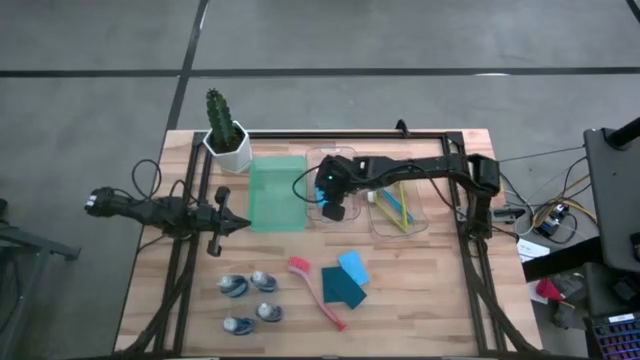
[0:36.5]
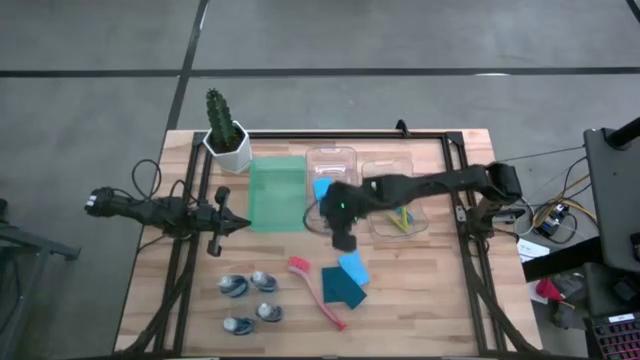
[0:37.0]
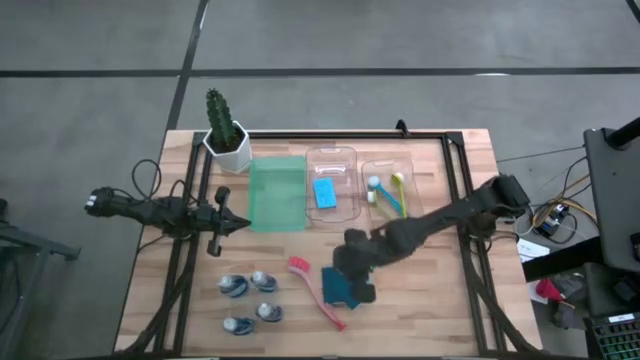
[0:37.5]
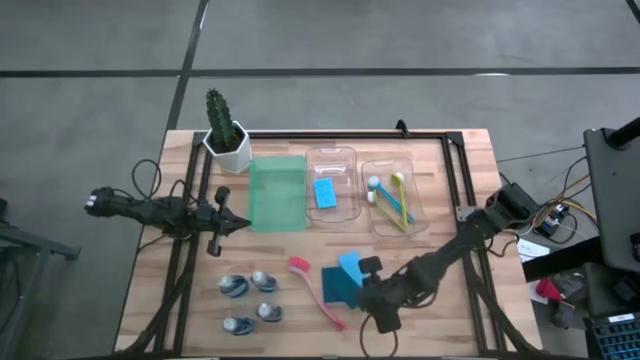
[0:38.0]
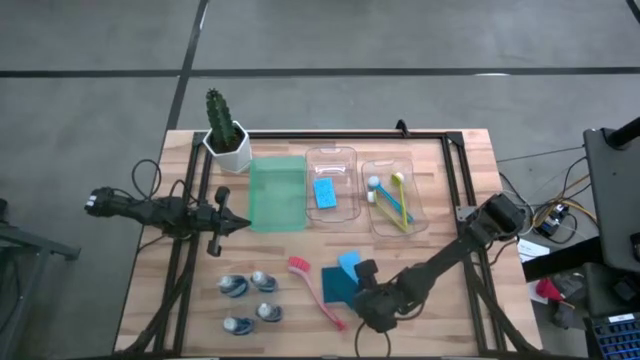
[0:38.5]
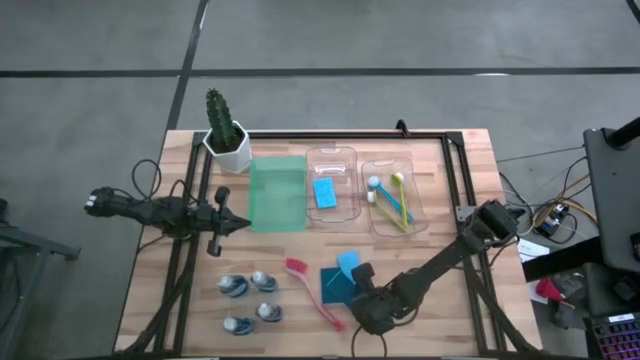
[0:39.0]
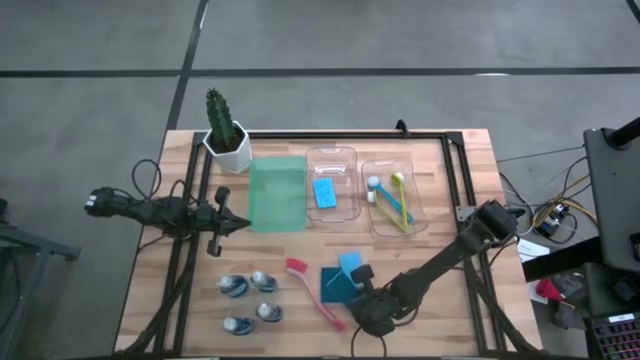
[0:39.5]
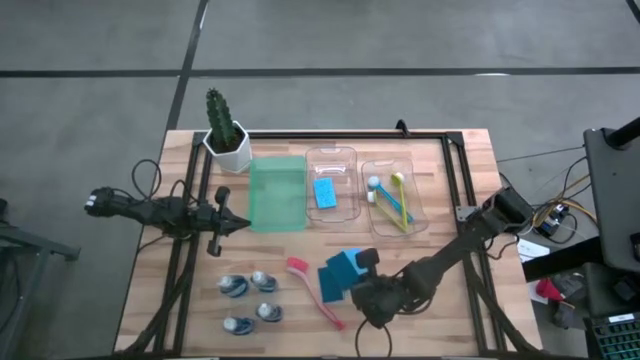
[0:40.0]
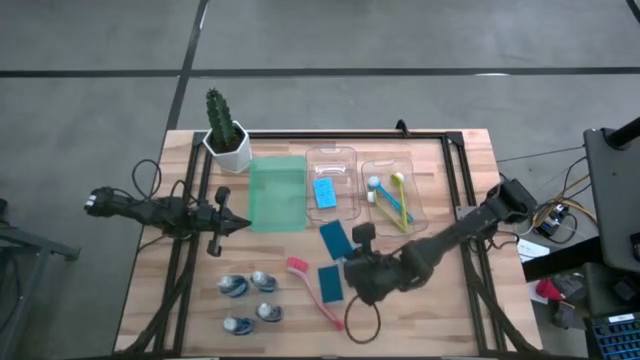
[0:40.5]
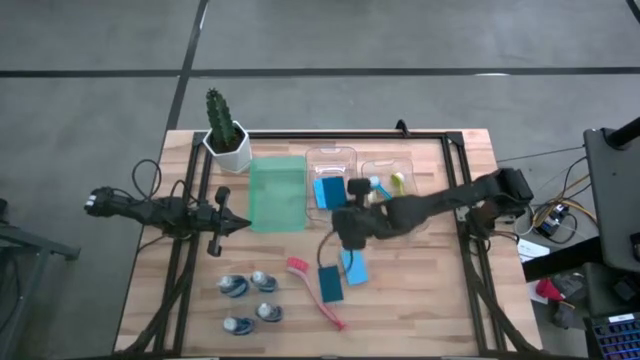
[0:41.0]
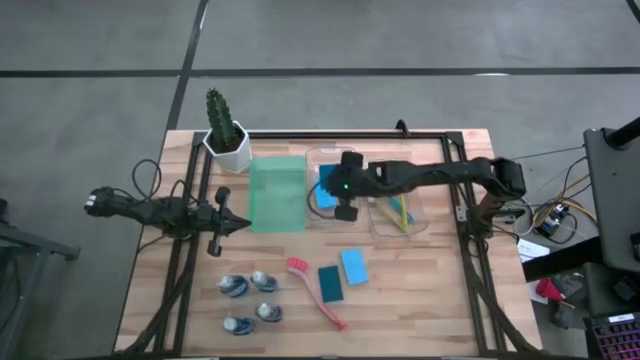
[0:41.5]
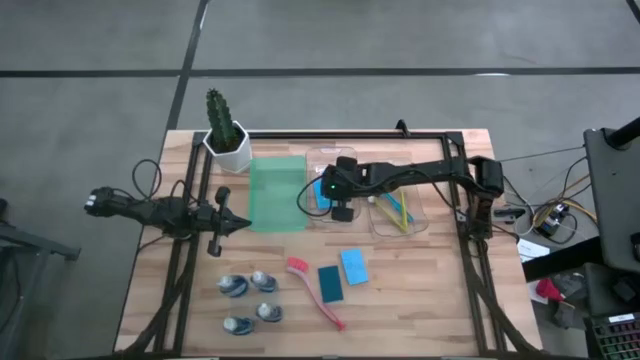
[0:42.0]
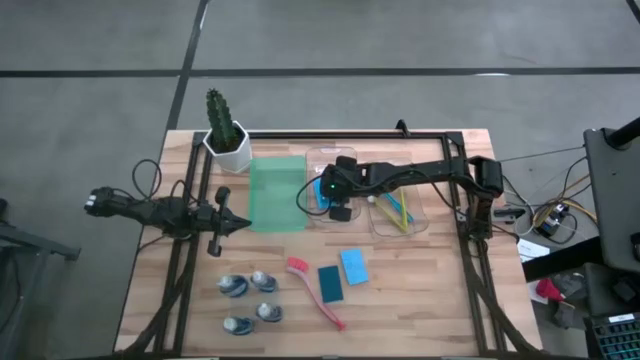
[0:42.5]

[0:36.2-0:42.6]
Task: Pick & Place Kitchen Sink Supplies
Put the dark blue sponge into the left transparent bin

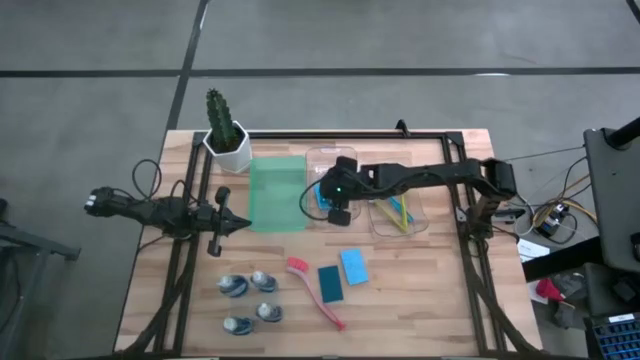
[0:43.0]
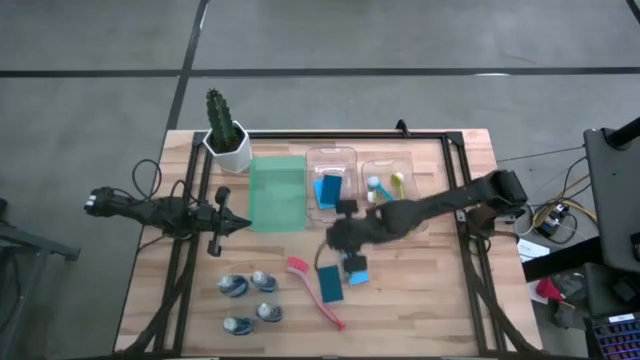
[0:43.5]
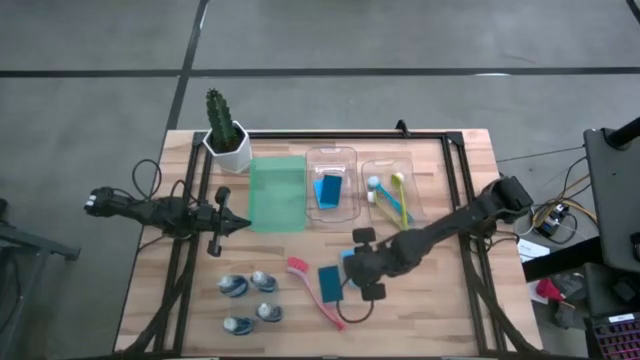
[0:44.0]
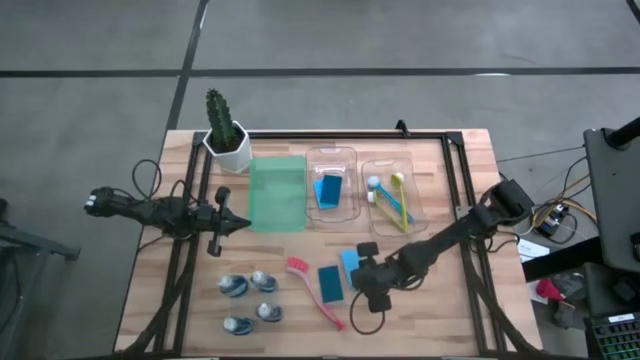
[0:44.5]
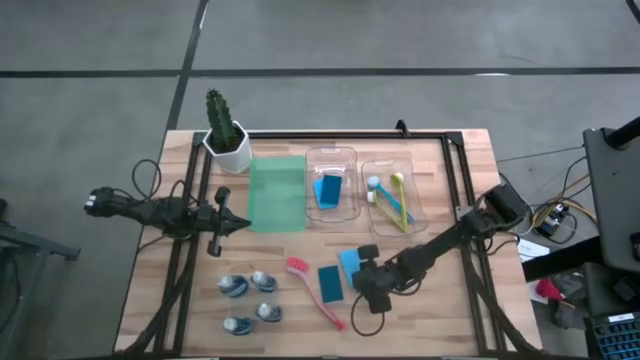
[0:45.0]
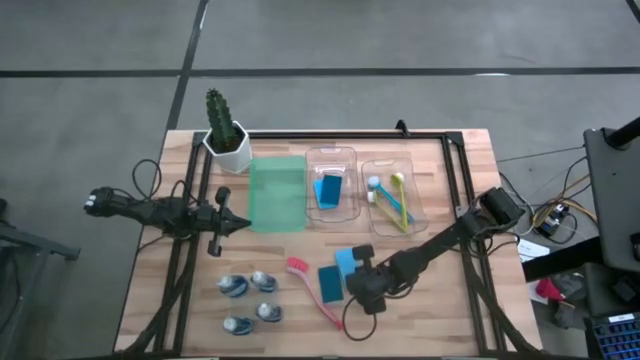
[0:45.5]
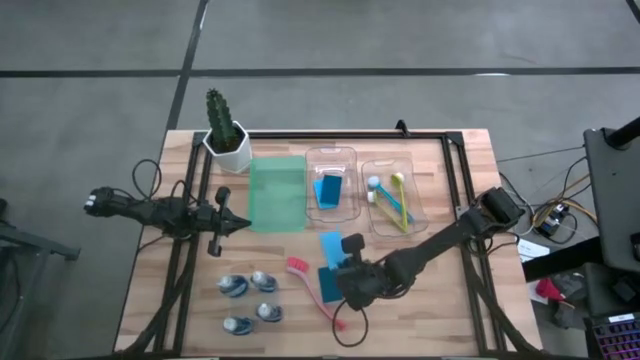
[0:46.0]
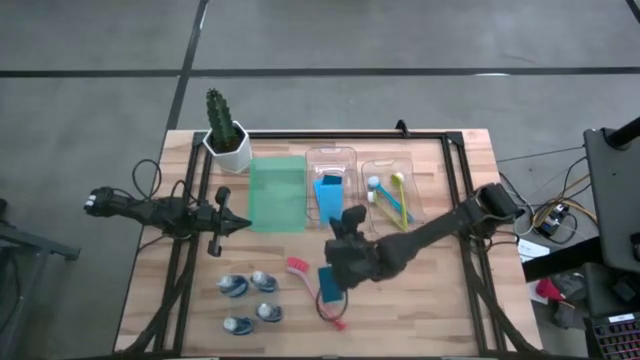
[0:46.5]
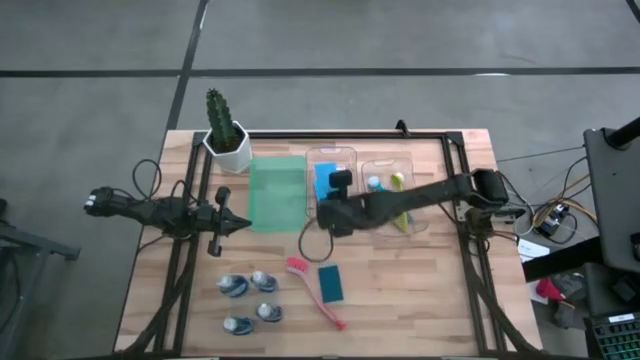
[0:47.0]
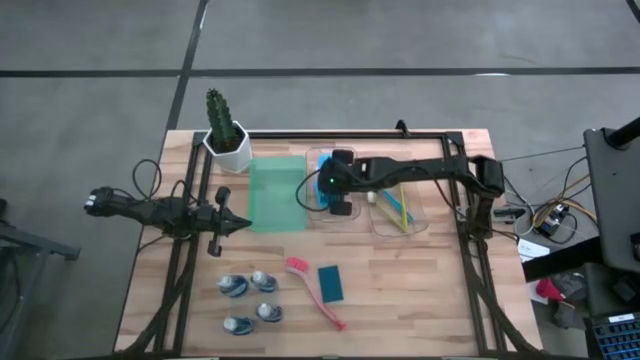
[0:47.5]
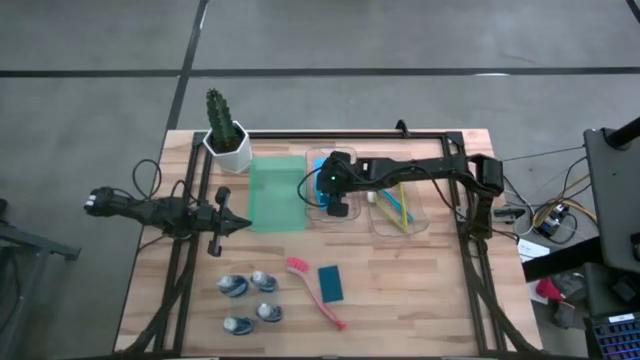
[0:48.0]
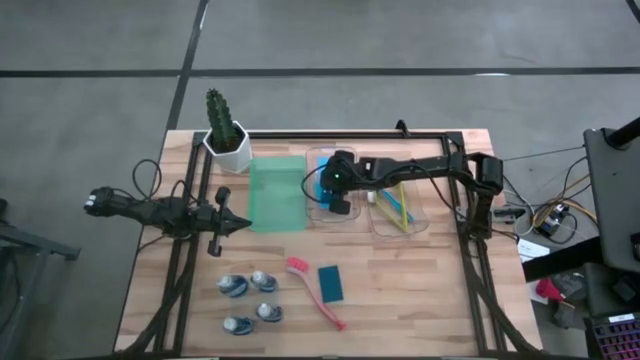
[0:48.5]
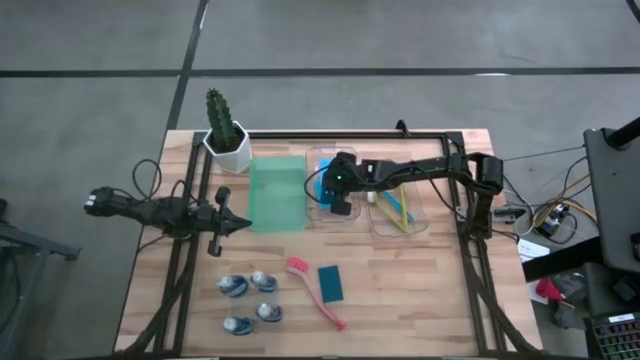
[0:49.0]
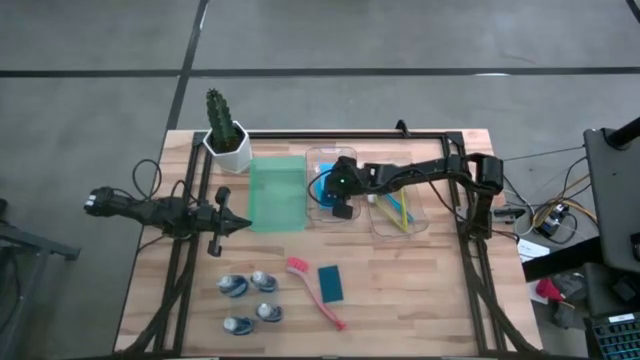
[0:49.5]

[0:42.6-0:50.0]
Put the blue sponge into the left transparent bin

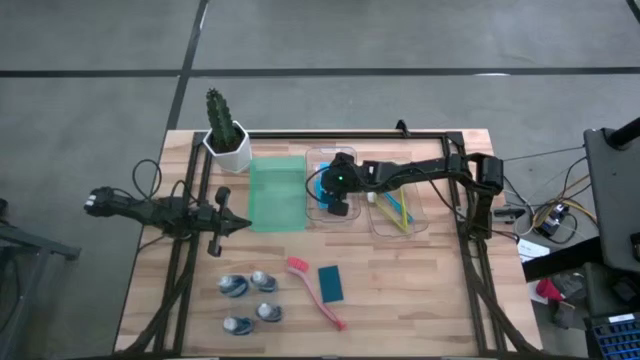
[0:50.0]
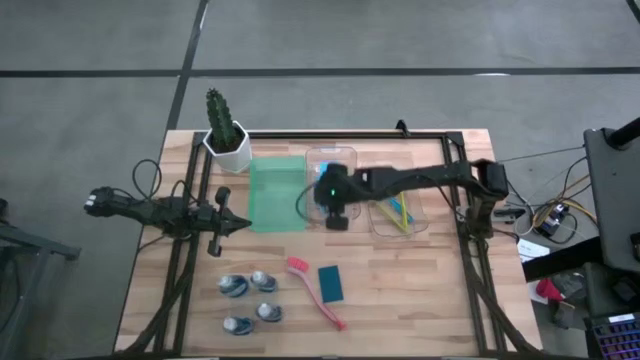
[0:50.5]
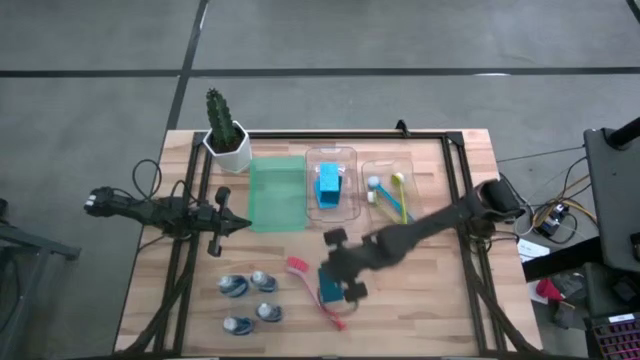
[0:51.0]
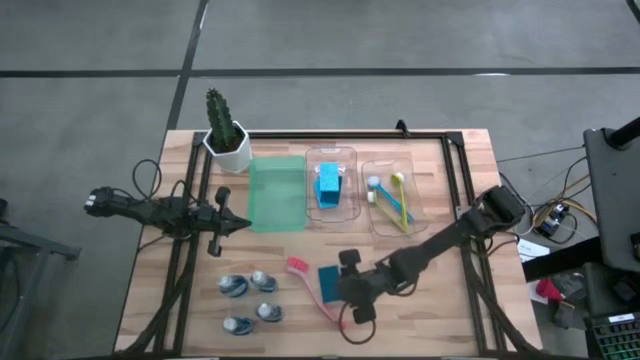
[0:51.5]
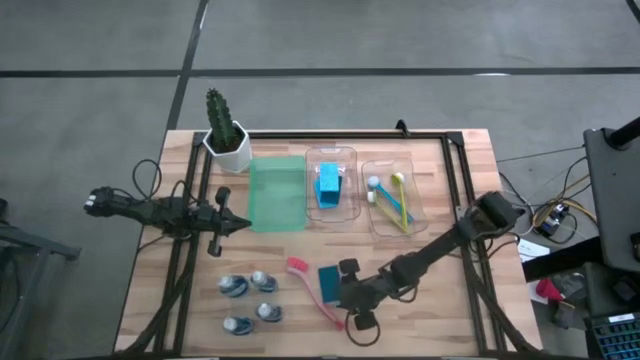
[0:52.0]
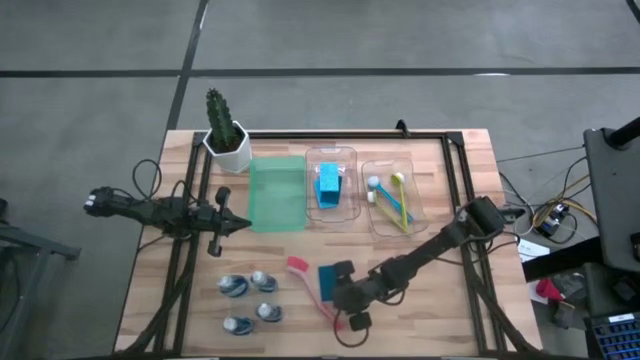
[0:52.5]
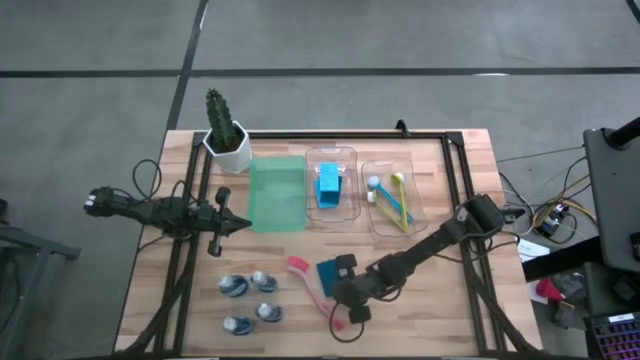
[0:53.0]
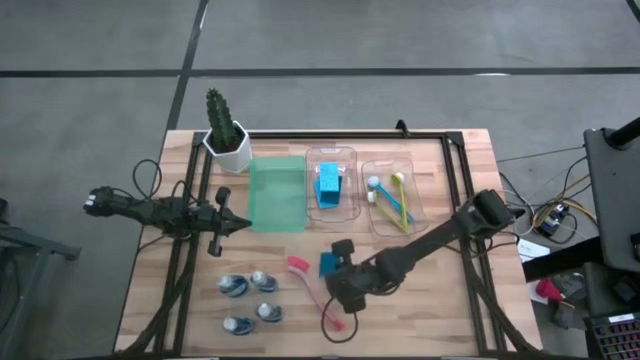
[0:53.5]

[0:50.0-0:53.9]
Put the dark blue sponge into the left transparent bin

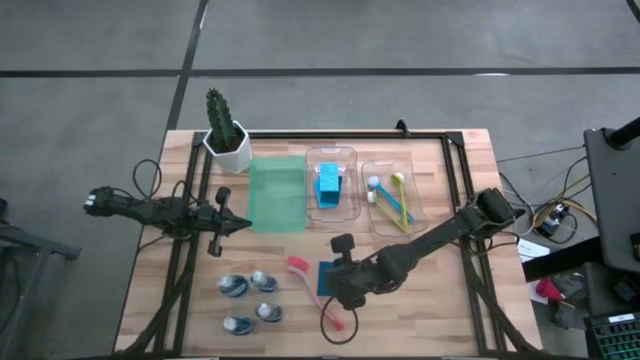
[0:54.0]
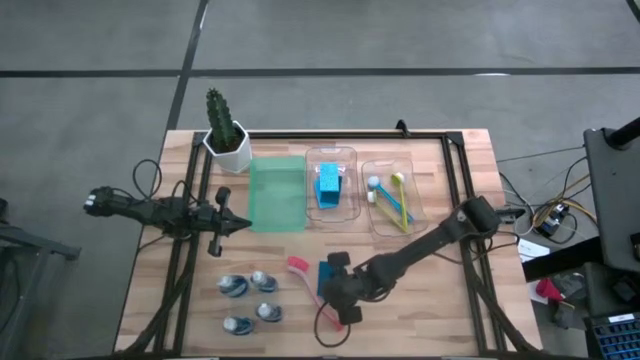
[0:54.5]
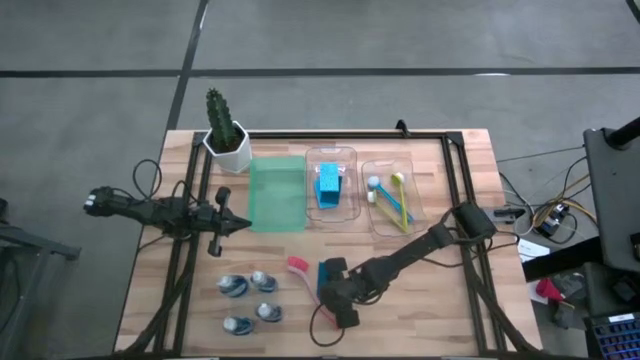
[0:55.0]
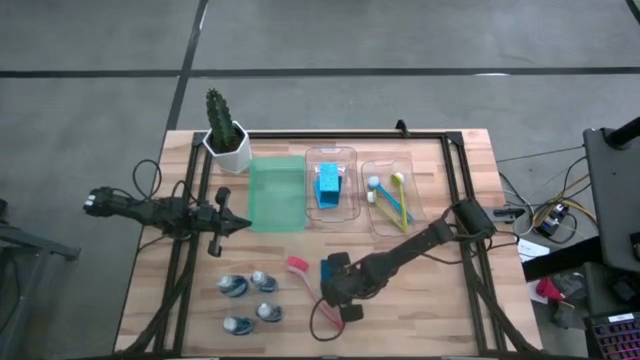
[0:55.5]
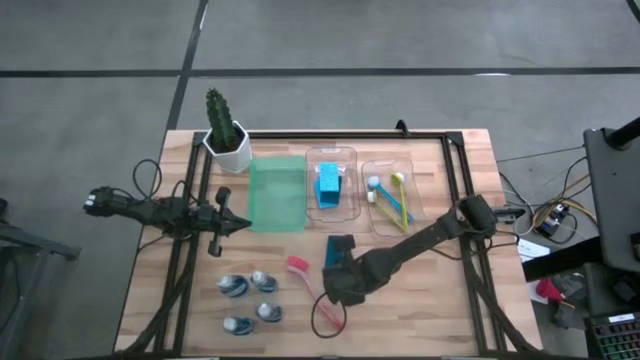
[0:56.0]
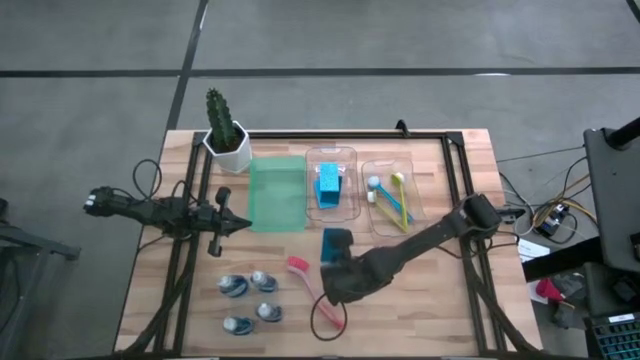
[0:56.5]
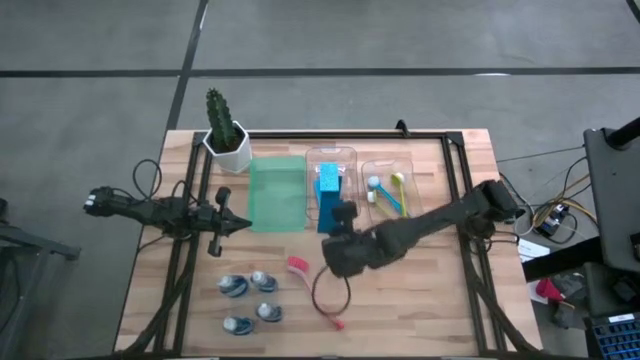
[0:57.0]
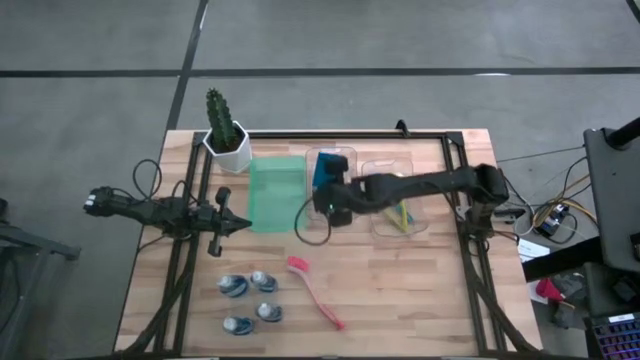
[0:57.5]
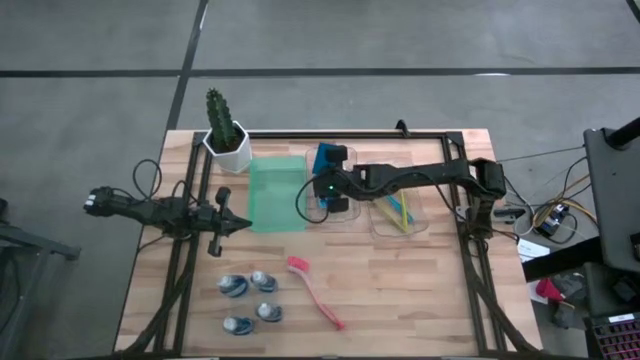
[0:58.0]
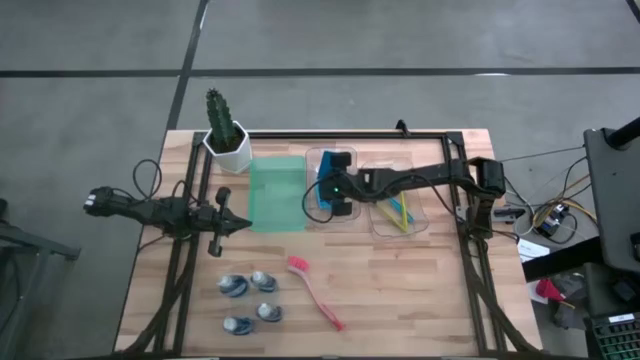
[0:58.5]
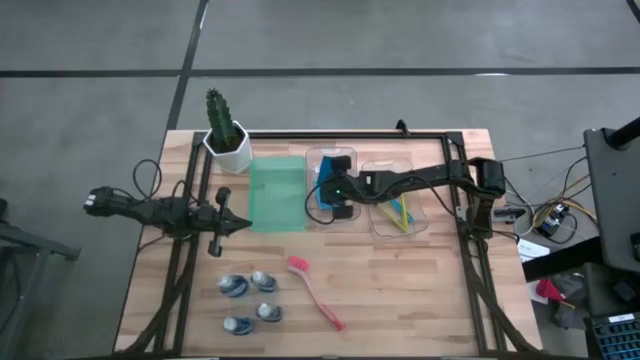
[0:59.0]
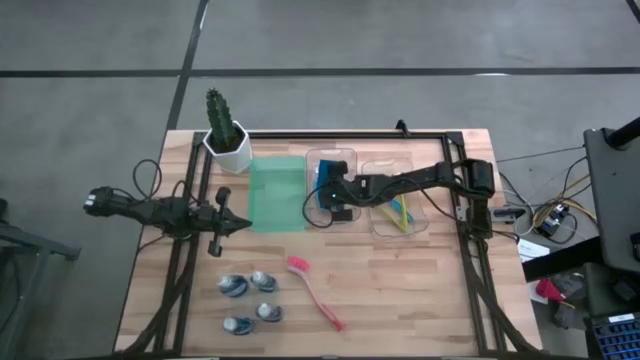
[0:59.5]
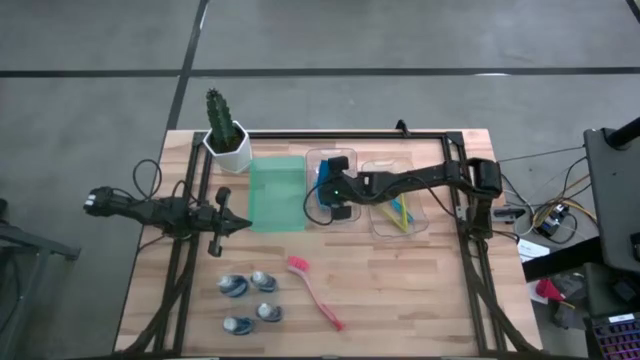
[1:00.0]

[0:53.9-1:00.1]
Put the dark blue sponge into the left transparent bin
